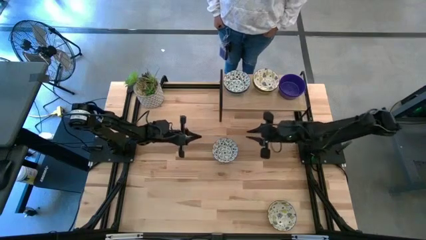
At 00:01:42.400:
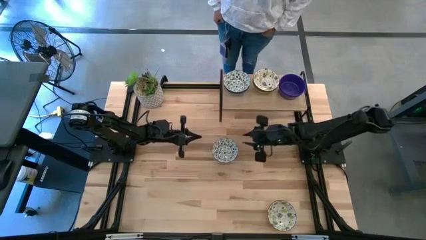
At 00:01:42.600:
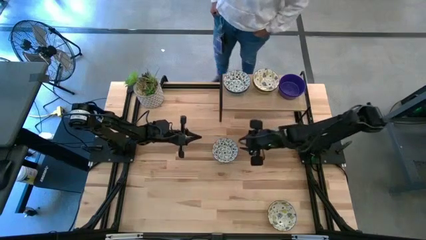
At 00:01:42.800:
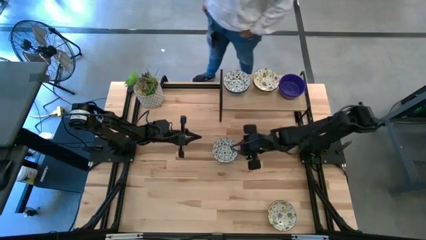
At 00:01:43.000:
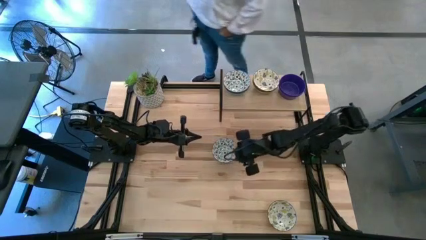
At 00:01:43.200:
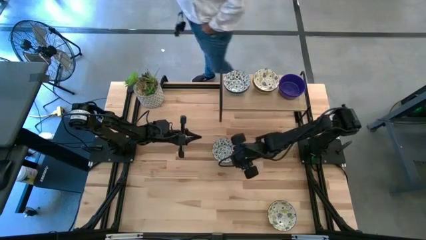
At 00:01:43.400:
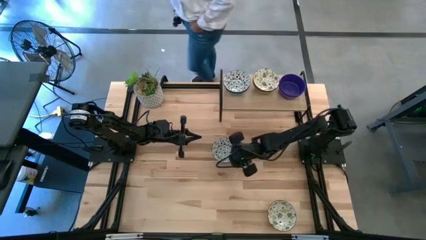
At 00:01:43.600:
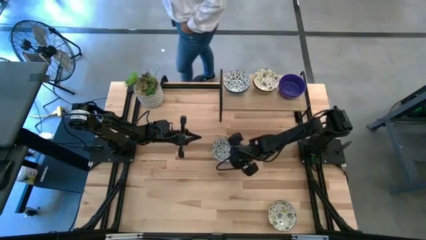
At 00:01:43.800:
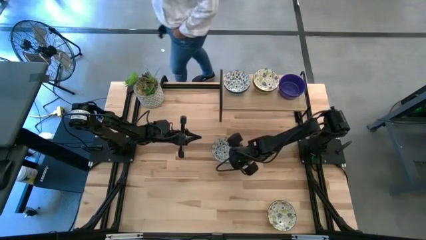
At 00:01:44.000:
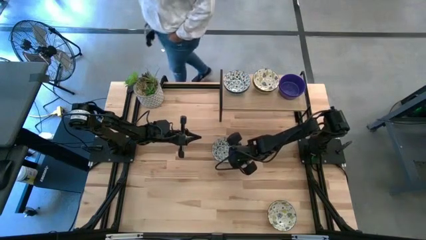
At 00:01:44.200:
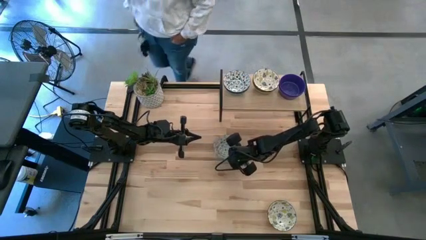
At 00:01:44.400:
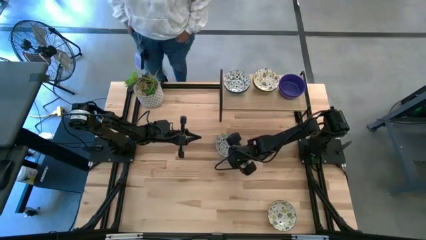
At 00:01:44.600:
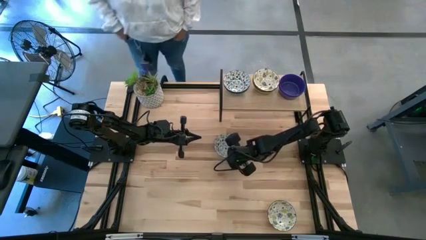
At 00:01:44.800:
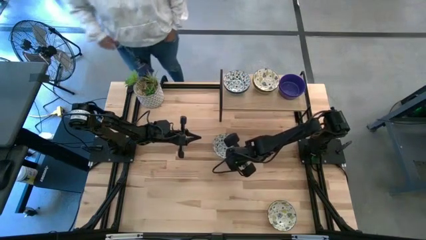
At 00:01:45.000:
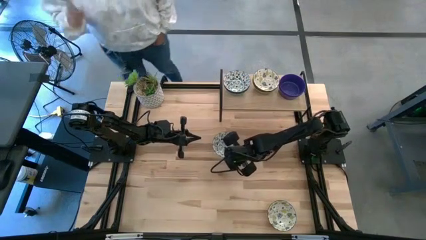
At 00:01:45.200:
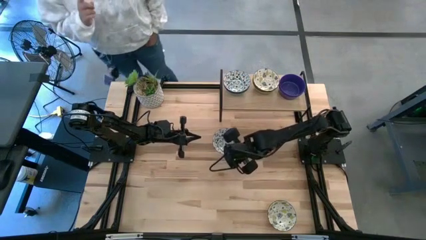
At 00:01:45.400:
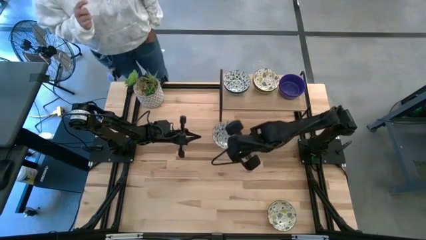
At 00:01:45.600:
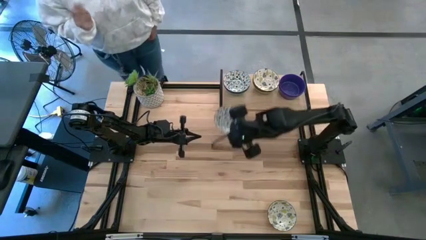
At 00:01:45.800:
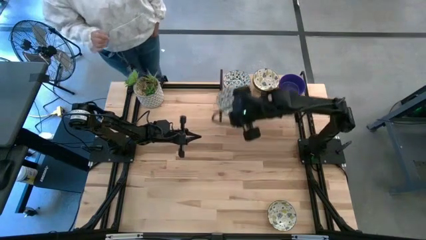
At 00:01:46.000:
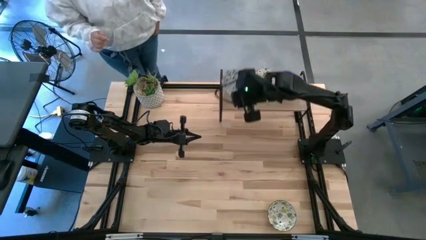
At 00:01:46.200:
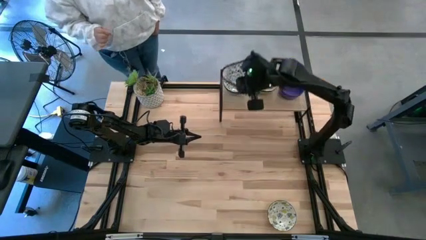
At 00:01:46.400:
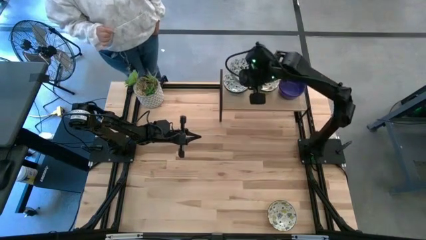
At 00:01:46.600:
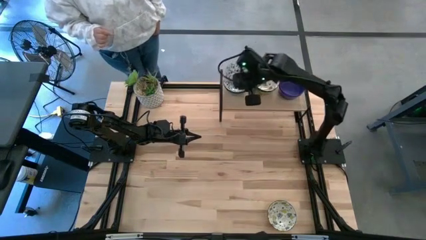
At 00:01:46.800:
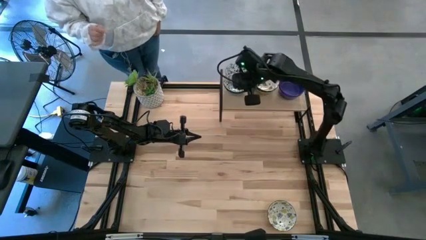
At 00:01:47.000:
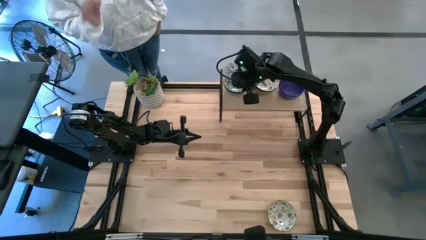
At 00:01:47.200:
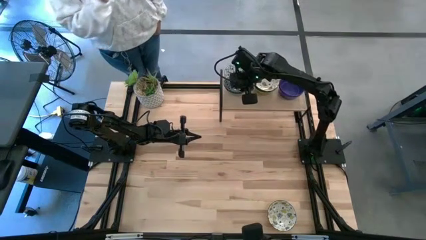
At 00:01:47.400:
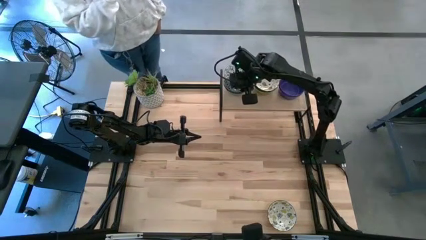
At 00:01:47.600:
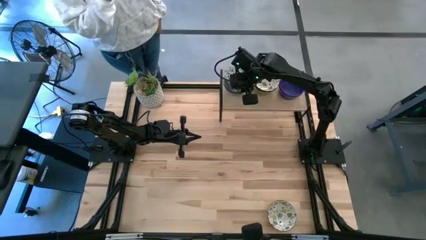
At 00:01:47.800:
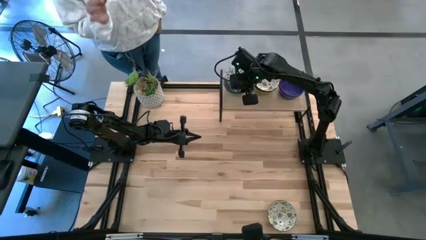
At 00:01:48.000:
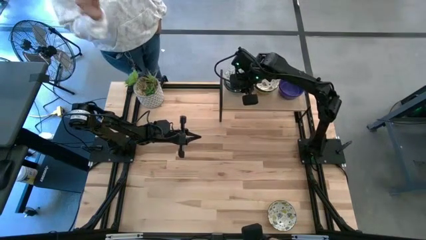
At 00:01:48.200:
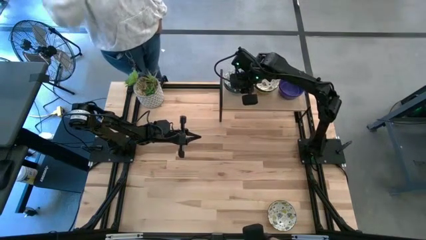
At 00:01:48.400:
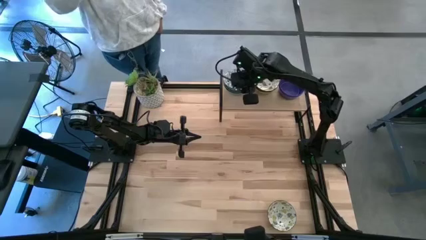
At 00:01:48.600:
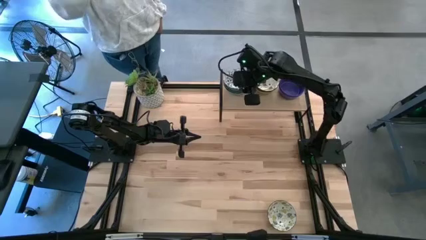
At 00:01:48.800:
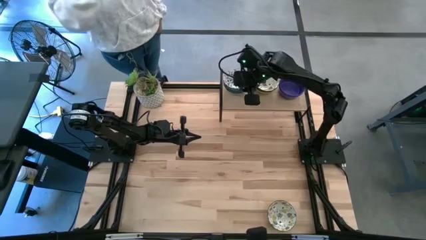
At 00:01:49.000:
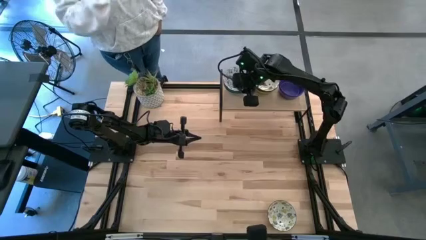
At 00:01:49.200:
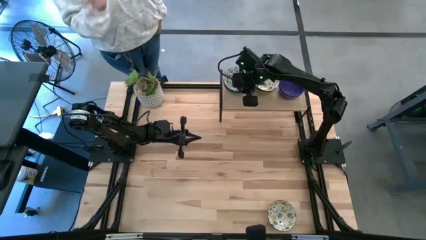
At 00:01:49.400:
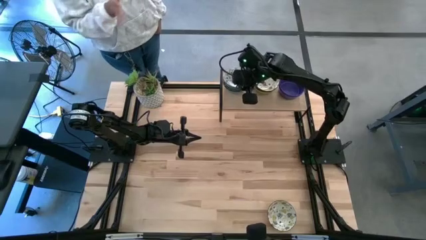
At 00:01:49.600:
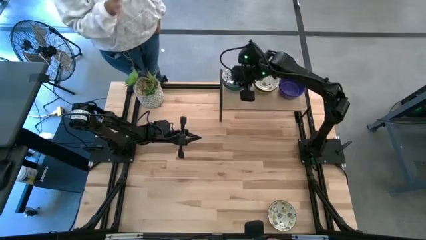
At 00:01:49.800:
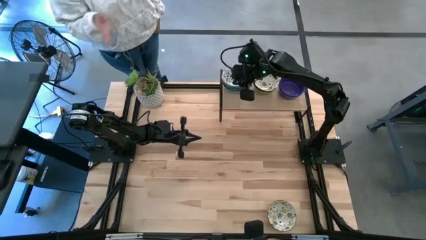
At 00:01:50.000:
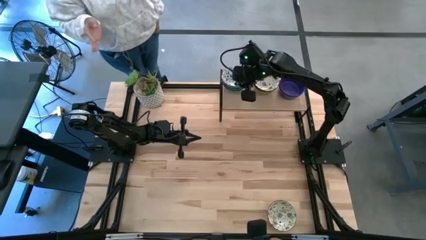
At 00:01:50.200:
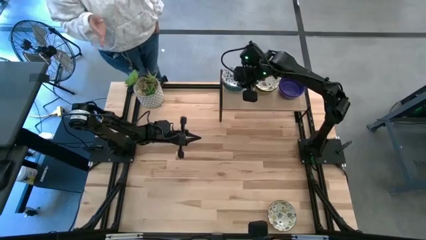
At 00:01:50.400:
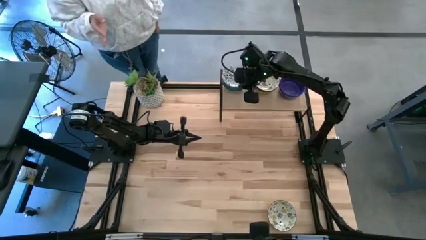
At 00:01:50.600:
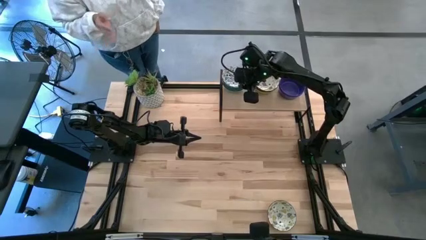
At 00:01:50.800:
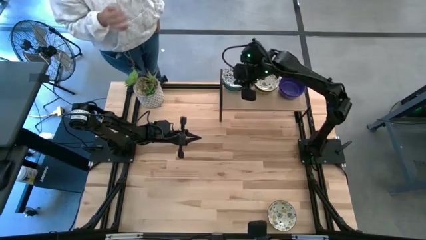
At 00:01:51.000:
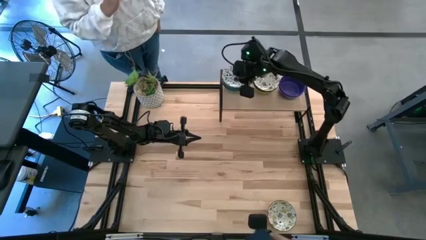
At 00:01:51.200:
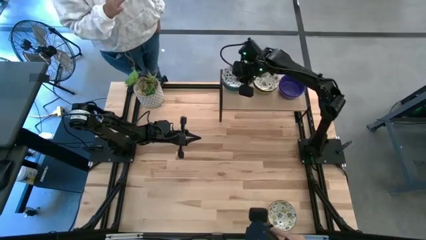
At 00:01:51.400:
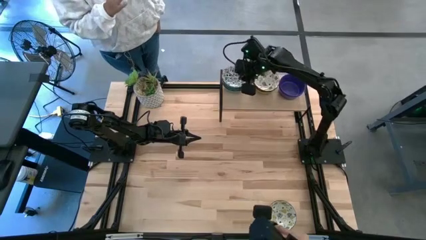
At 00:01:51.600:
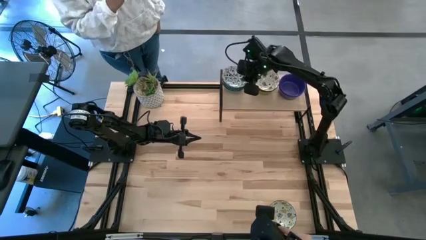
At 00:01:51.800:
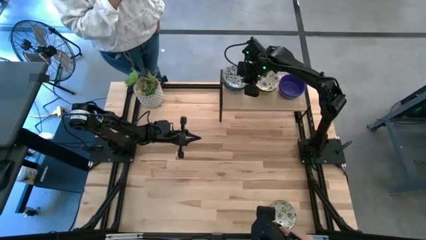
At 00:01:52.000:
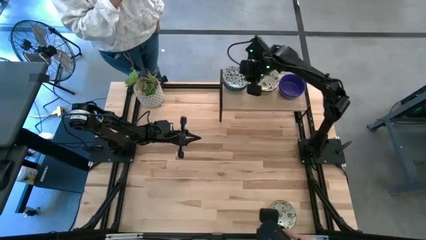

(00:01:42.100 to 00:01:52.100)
Task: Pick & Place Mini bowls
Stack the blue patterned bowl on the blue patterned bowls on the shelf

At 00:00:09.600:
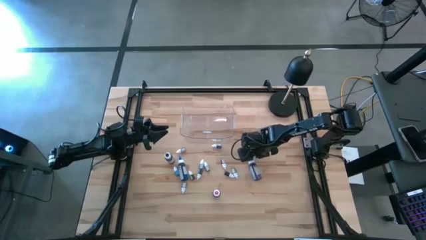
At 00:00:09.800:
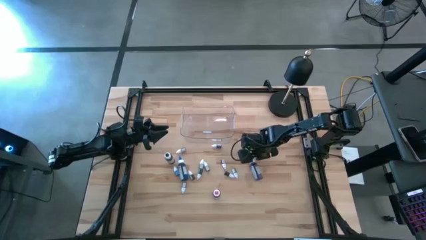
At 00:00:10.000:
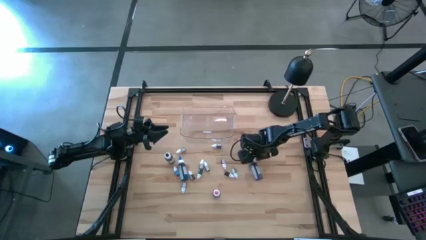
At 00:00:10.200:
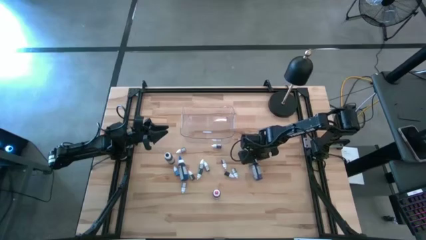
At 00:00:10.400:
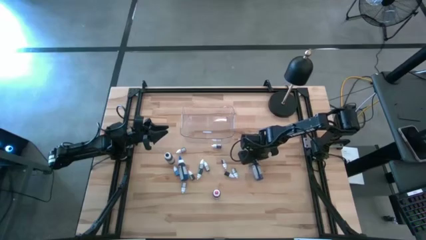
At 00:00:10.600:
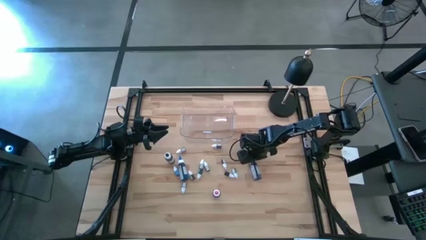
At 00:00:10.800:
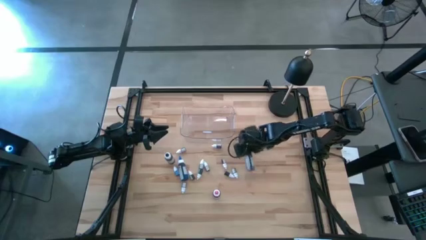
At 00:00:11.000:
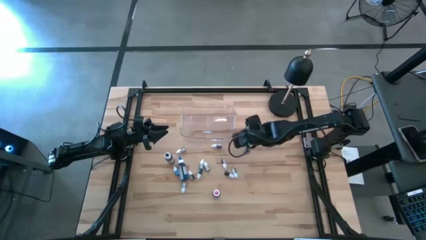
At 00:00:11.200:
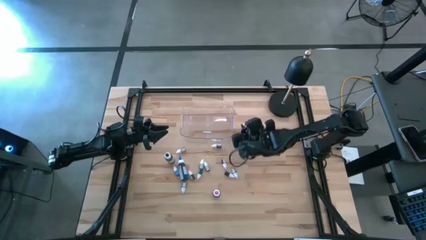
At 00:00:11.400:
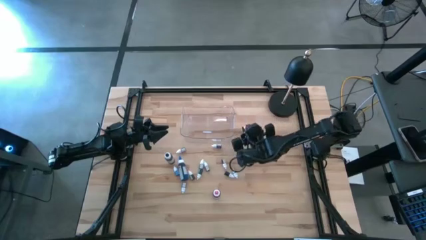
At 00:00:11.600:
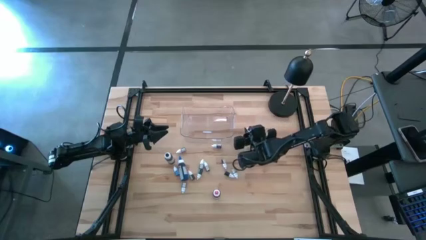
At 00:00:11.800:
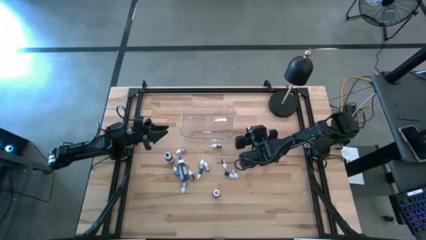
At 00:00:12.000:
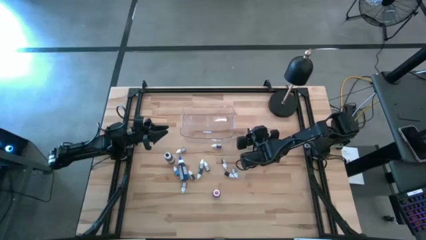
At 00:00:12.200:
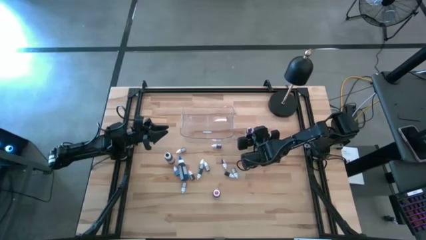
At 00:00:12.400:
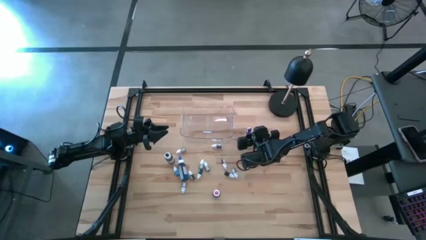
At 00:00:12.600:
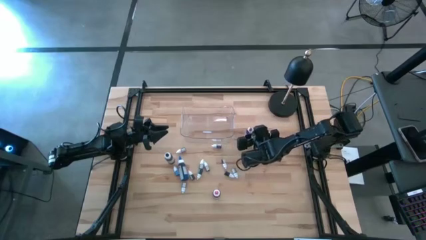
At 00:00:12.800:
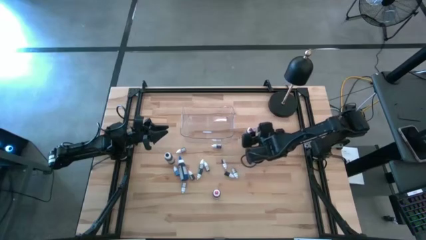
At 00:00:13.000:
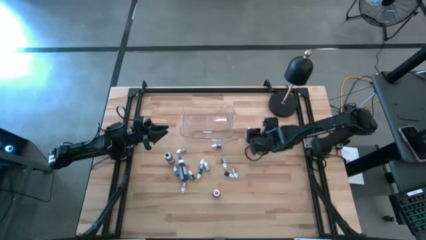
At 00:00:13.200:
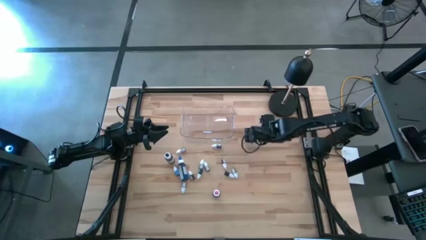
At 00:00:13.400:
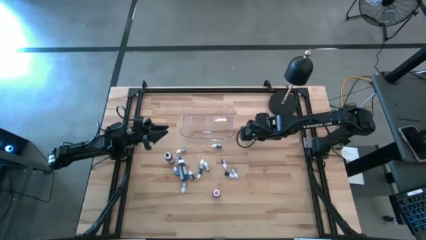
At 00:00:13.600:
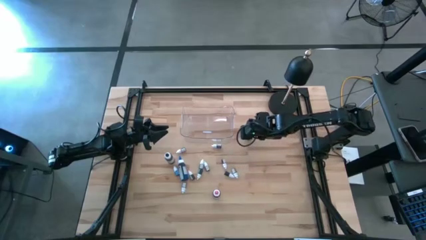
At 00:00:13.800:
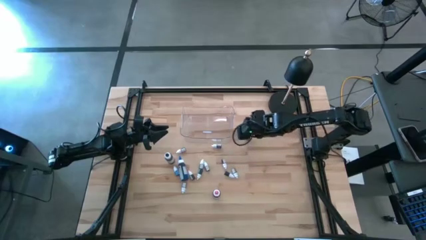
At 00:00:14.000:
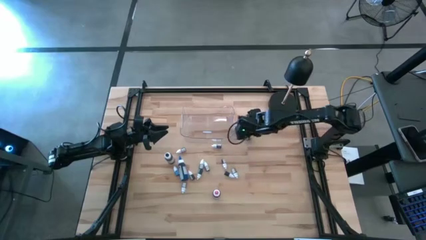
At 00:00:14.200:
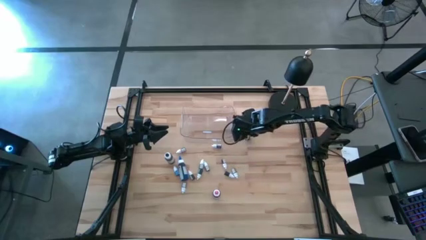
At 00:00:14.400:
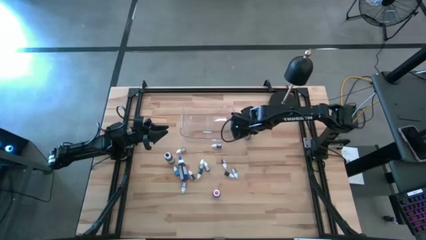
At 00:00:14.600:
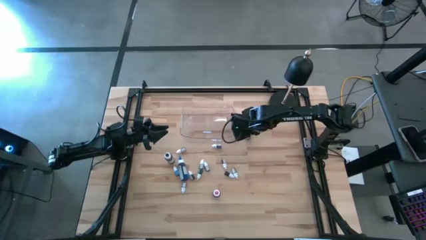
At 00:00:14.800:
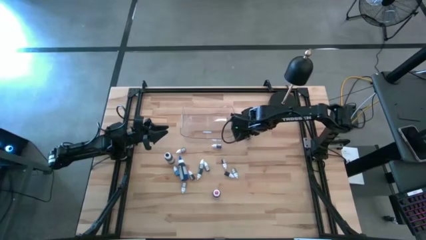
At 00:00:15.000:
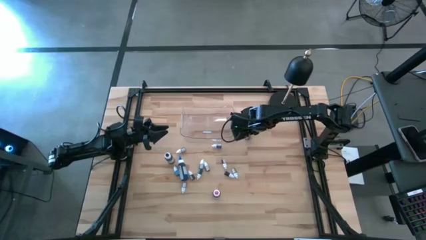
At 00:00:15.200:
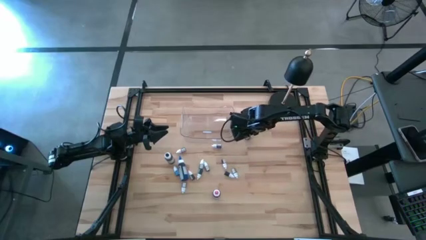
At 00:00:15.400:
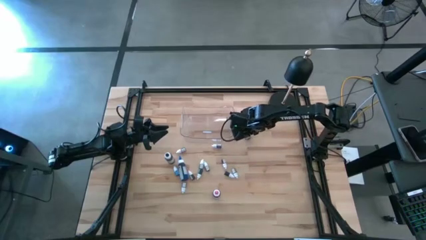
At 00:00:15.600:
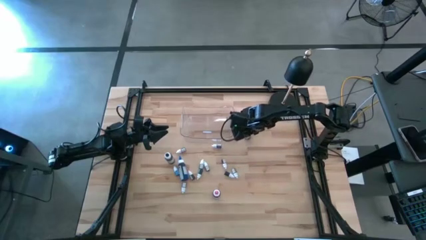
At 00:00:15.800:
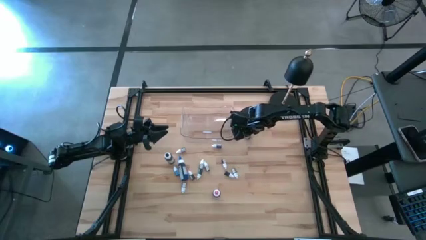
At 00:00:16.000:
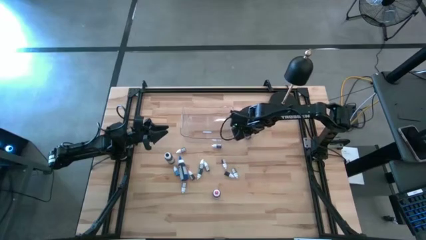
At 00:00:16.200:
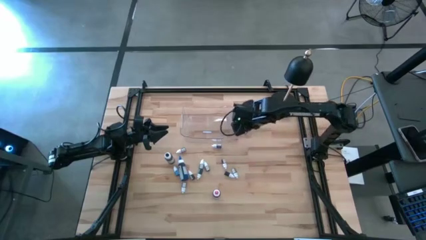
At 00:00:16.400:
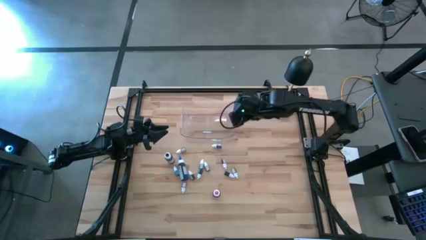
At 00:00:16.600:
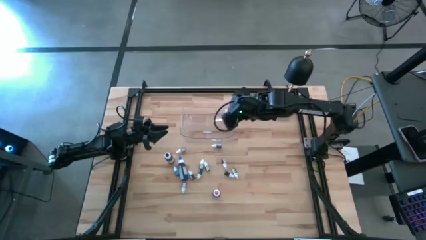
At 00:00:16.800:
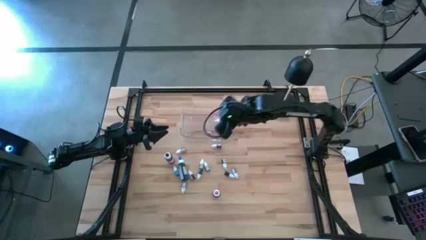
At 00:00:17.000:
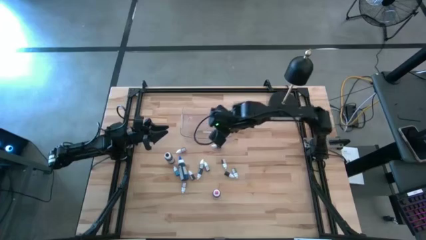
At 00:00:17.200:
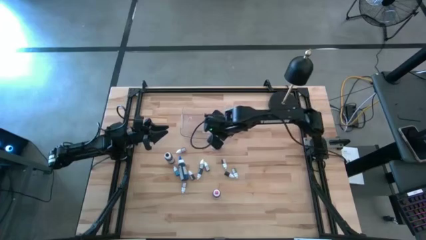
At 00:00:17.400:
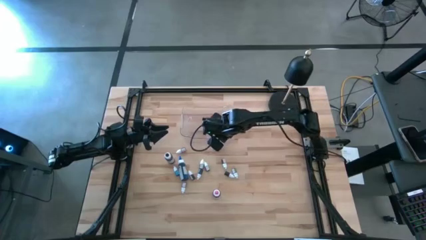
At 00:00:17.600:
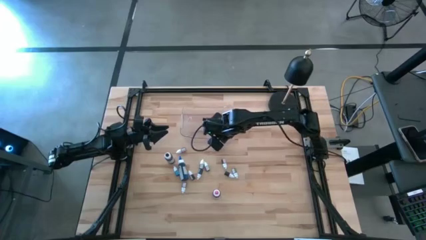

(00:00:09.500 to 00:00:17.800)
Task: Pick & Place food coloring
Put the large violet food coloring bottle into the transparent bin
